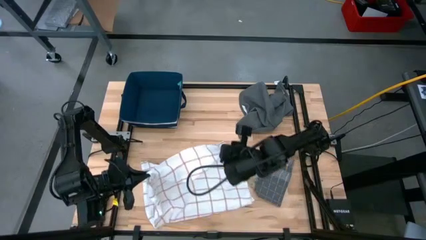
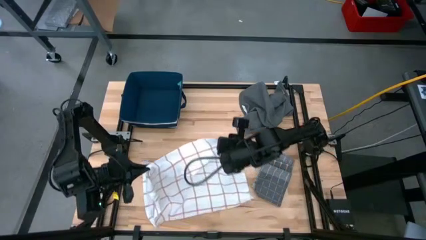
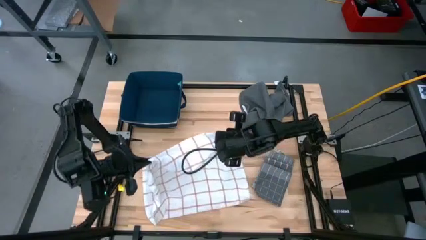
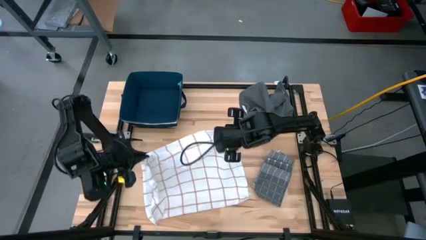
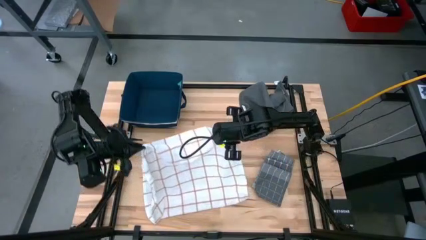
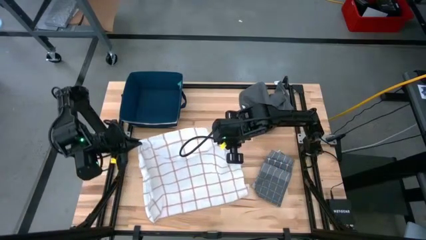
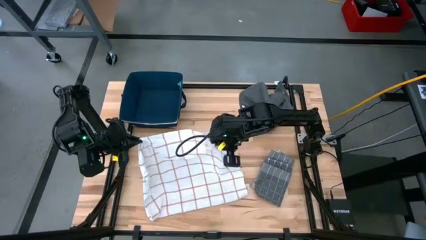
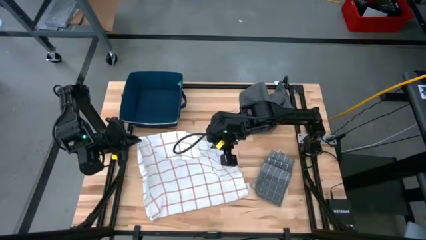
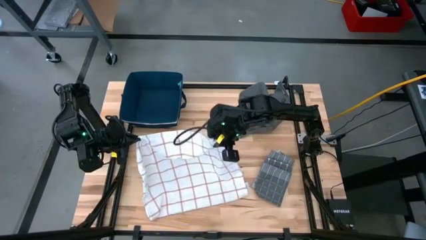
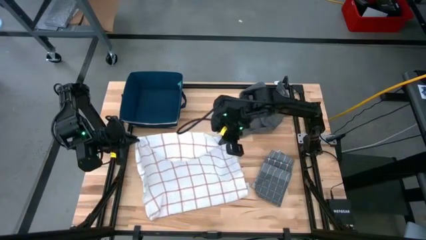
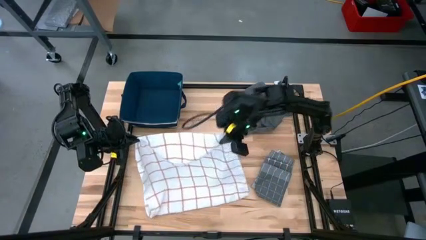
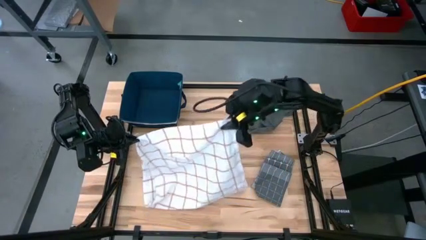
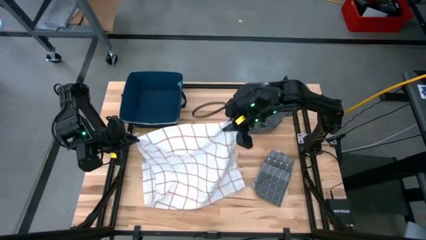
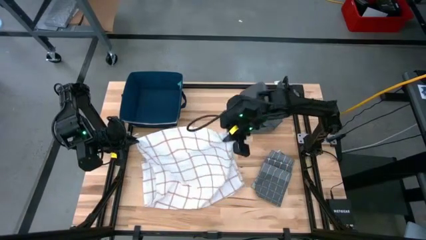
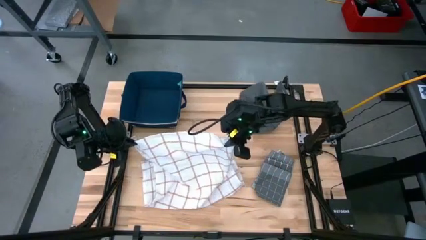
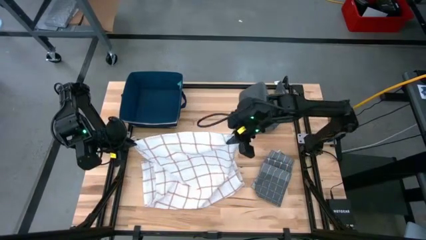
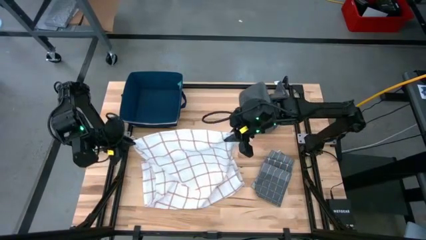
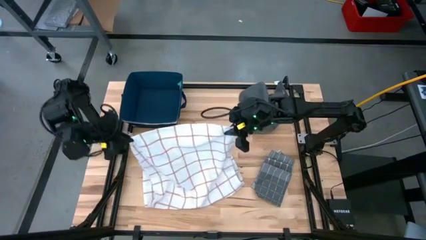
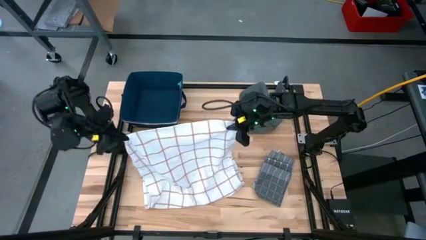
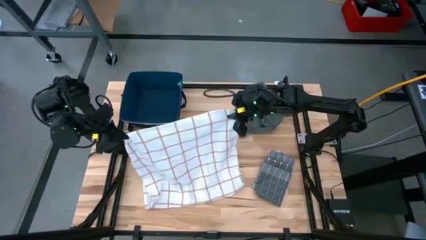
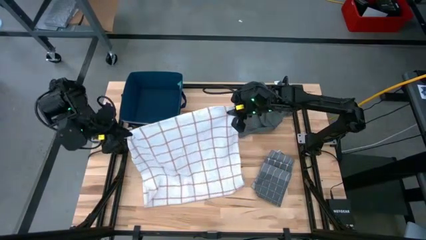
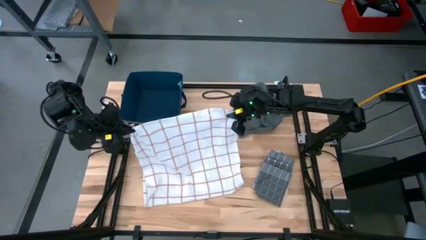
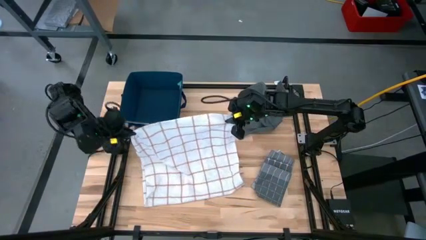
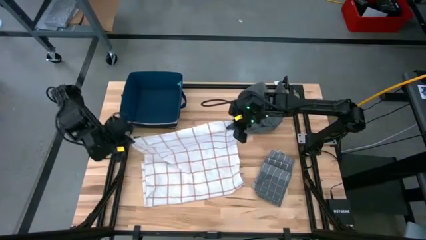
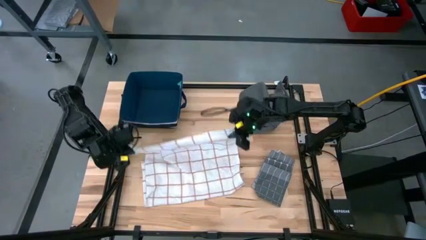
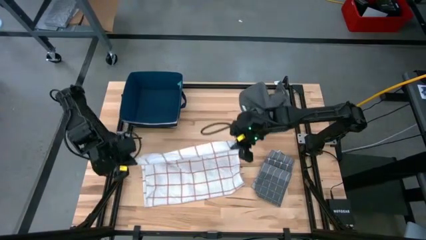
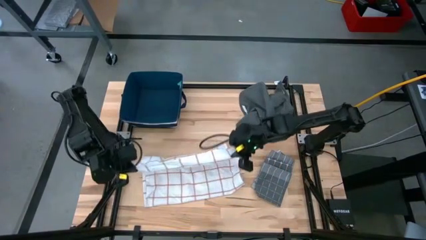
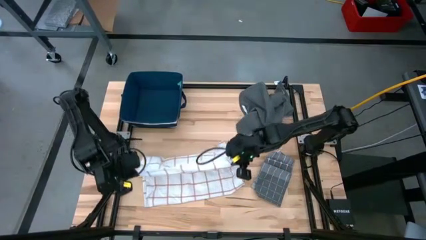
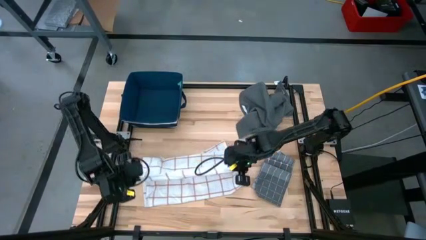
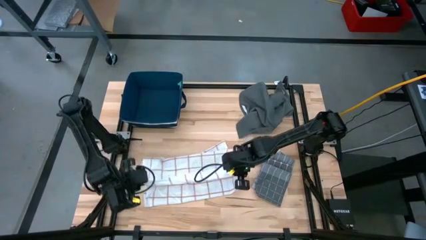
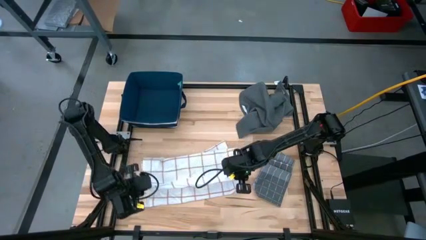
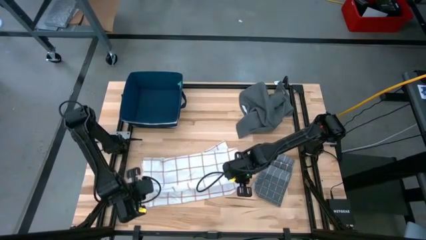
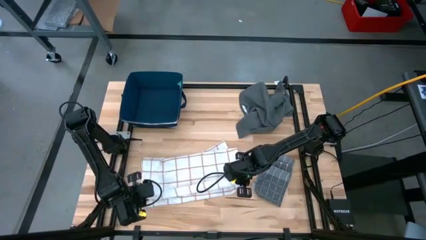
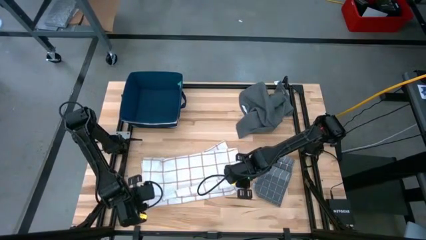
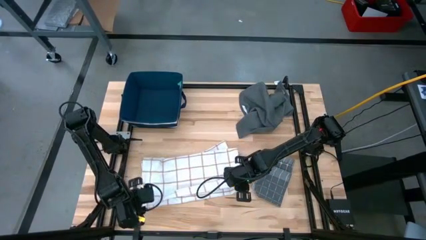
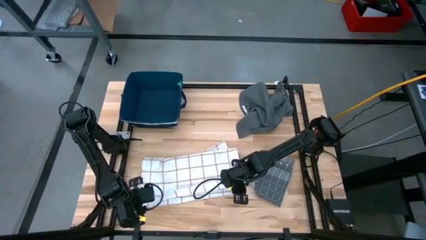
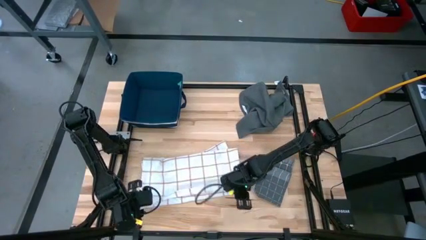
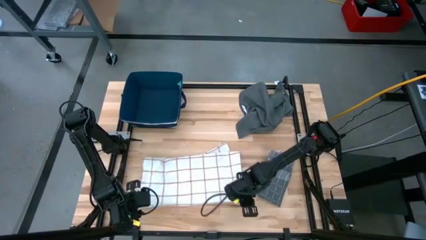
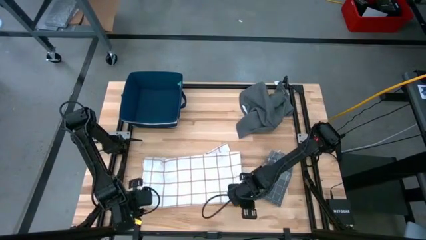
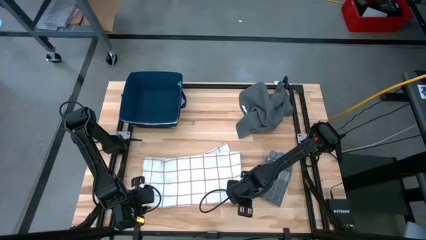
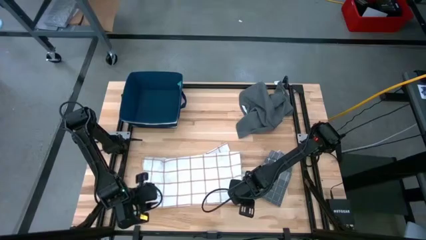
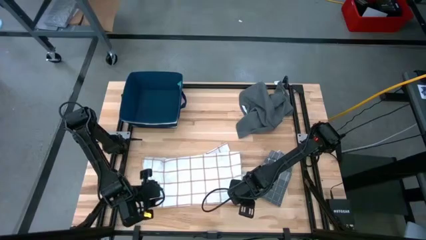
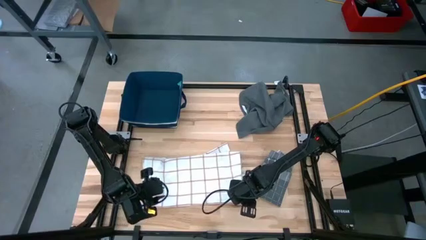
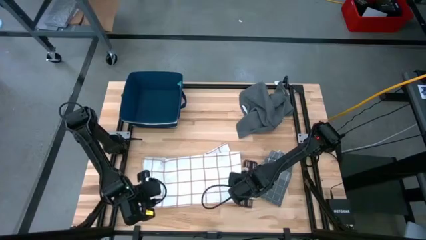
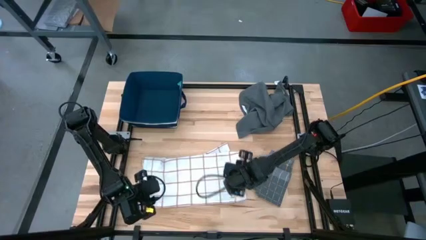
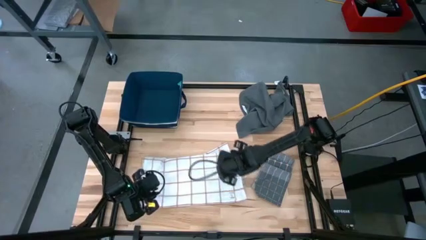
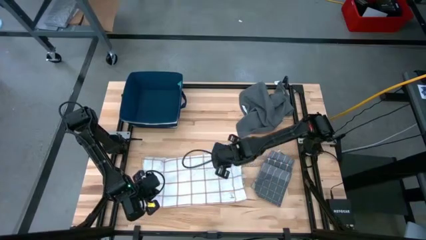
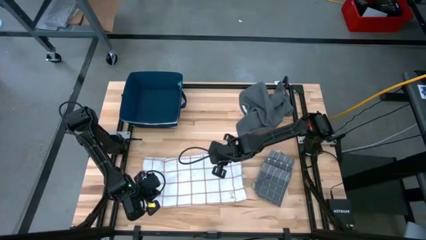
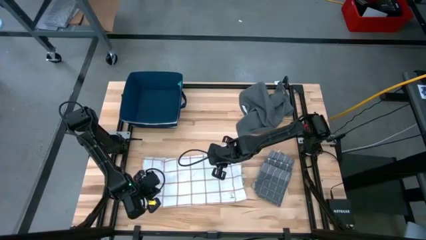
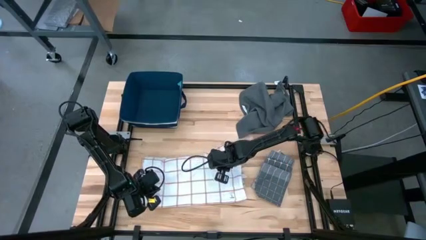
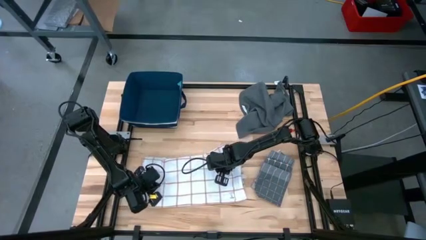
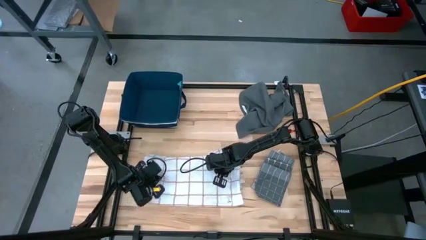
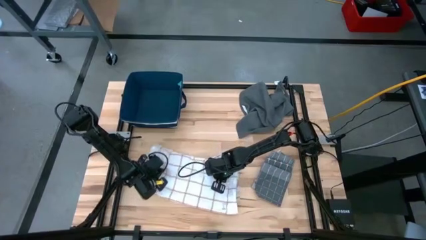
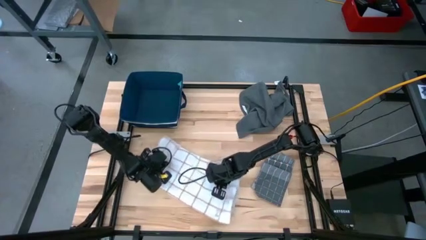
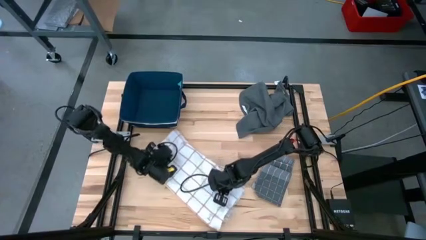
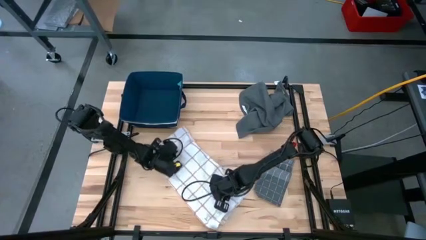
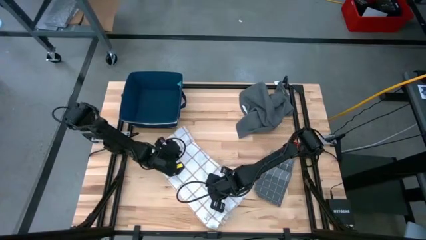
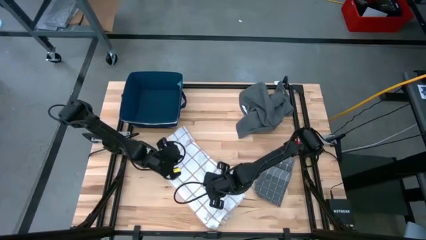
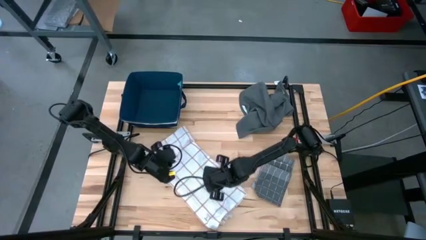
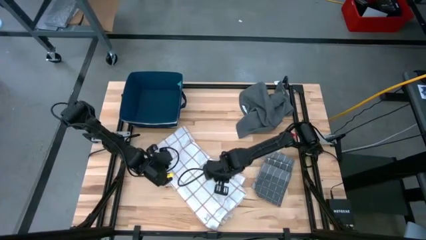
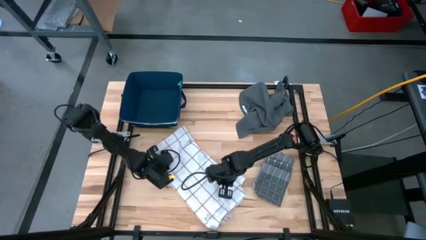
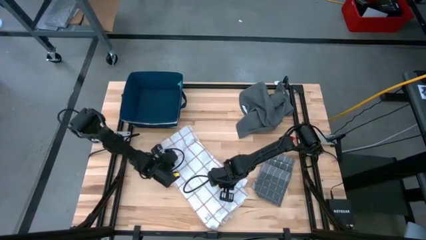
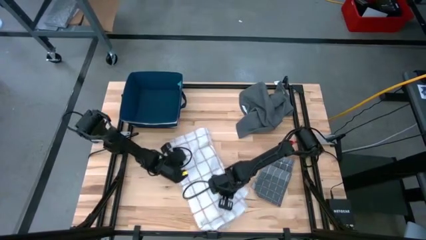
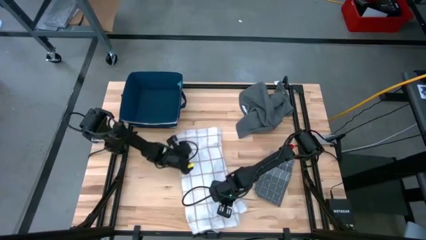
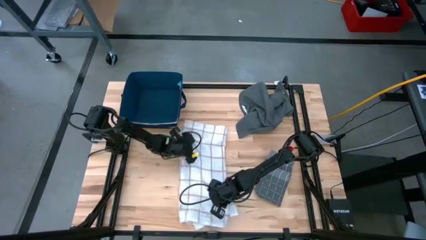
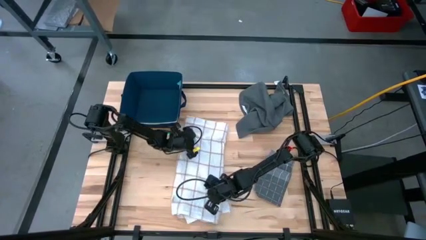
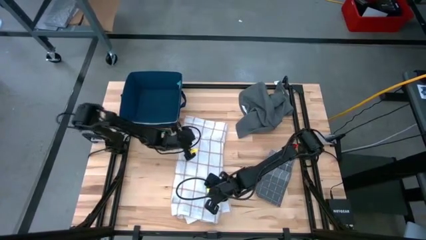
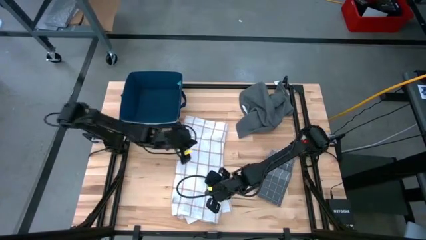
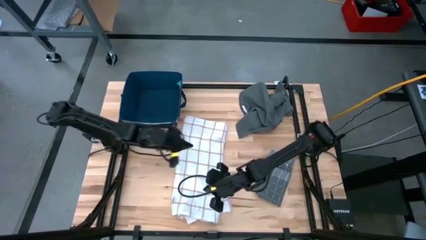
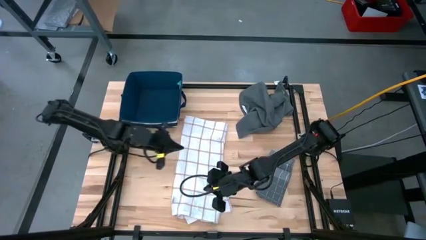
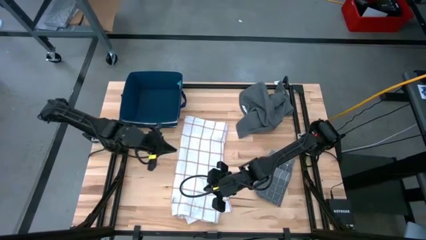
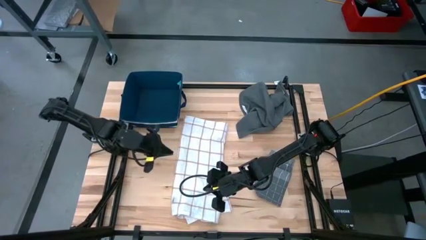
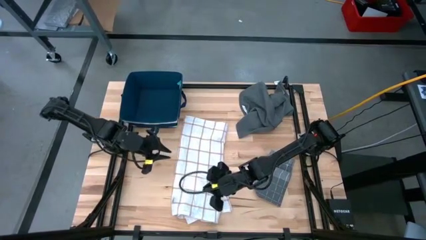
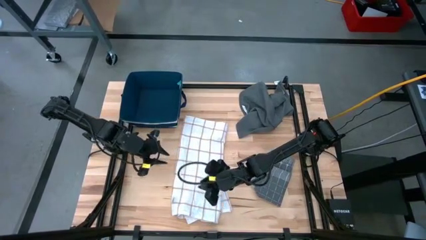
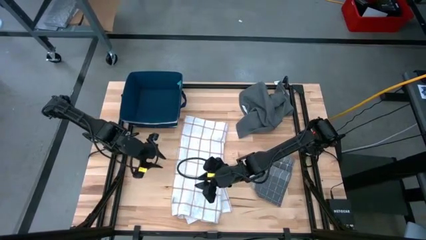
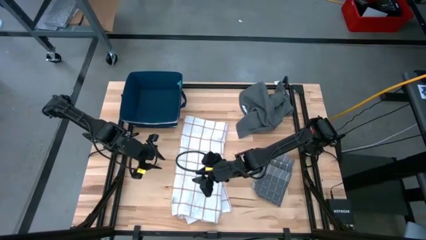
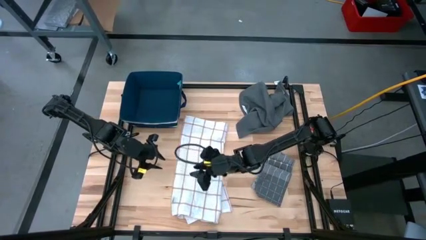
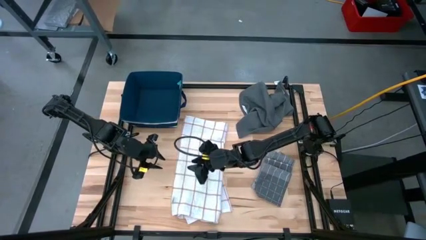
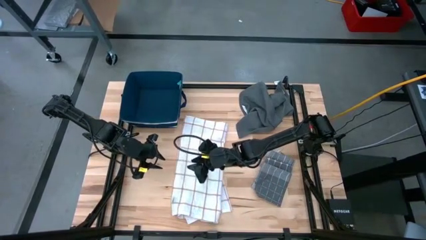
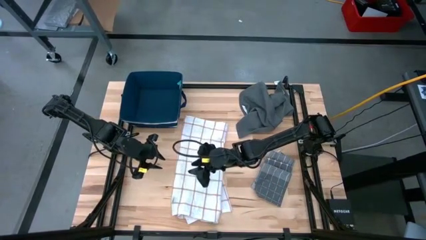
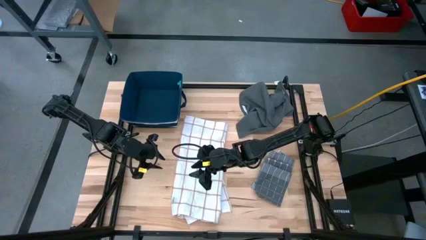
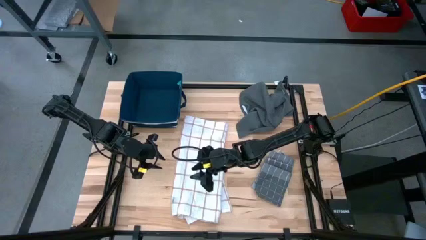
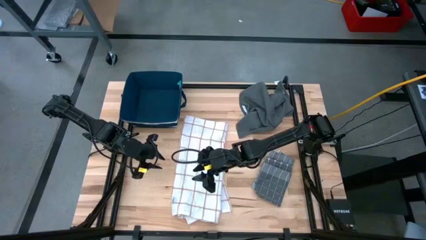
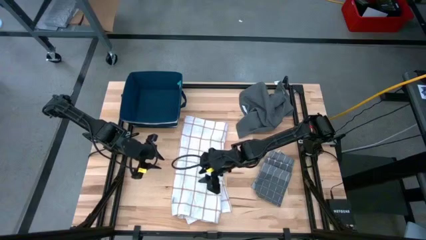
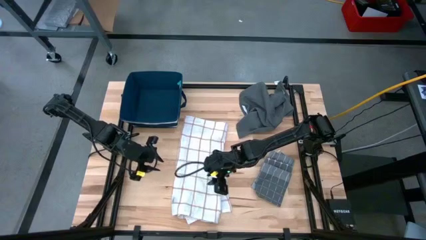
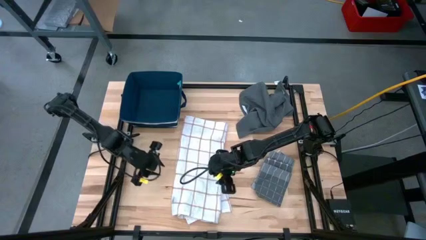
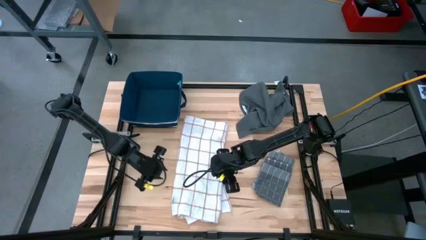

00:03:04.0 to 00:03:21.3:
Task: Fold towel
Fold the white towel
